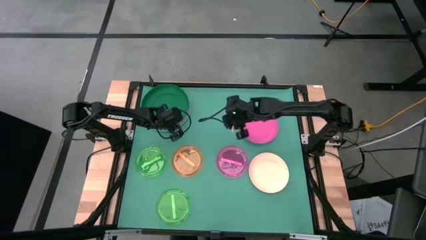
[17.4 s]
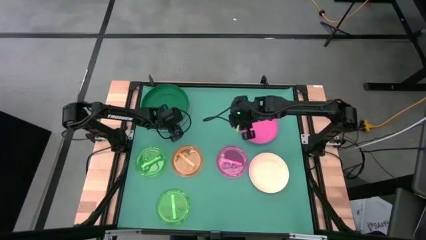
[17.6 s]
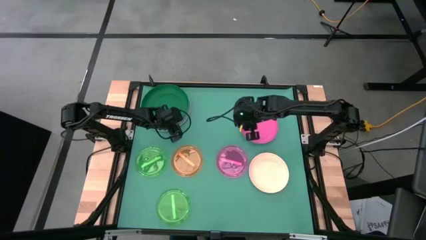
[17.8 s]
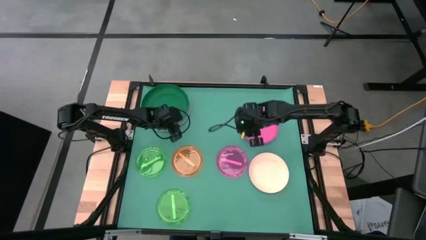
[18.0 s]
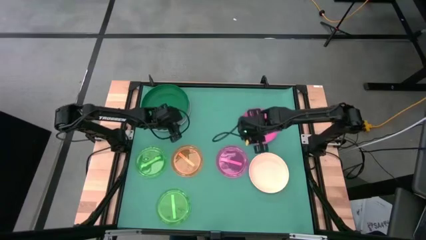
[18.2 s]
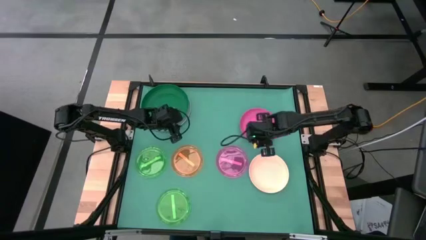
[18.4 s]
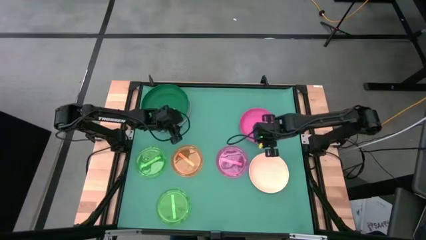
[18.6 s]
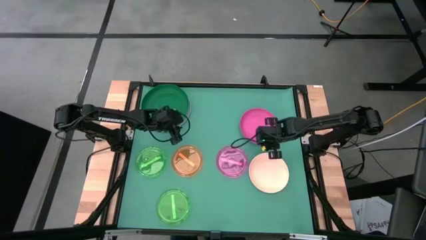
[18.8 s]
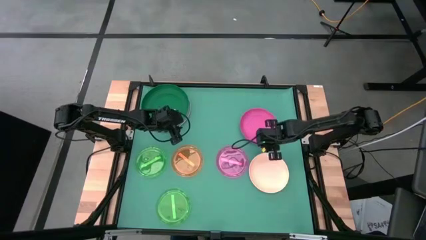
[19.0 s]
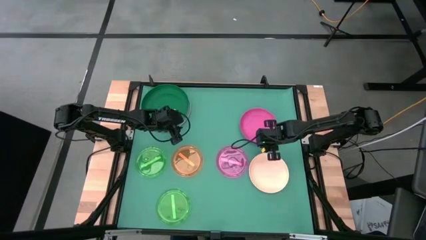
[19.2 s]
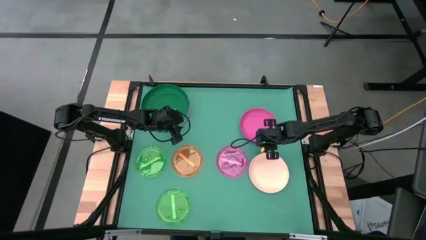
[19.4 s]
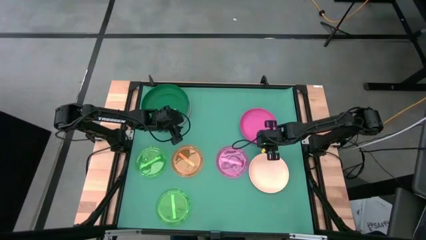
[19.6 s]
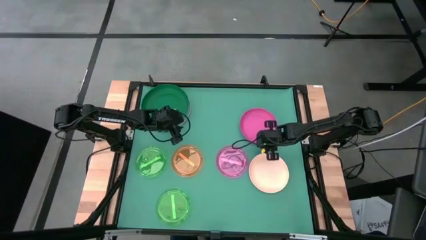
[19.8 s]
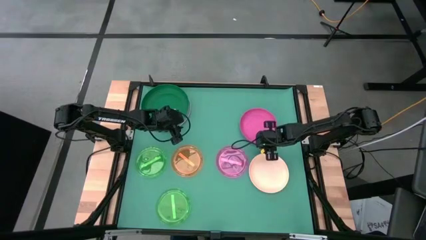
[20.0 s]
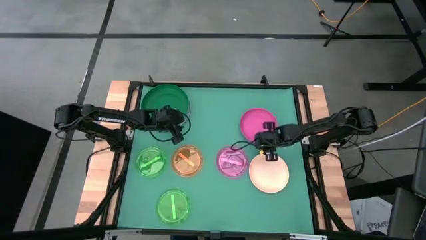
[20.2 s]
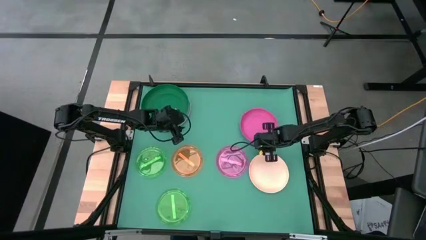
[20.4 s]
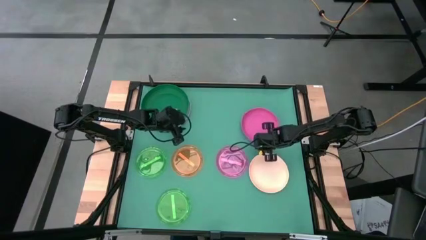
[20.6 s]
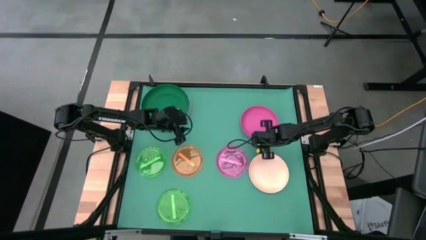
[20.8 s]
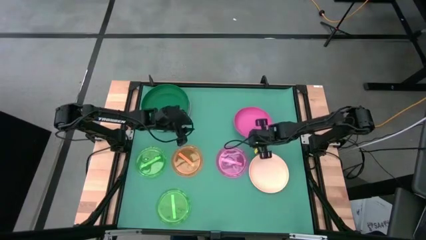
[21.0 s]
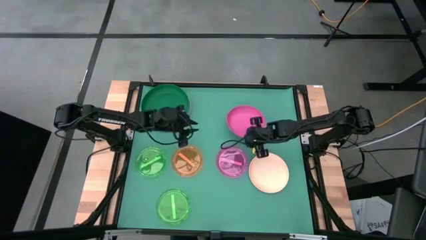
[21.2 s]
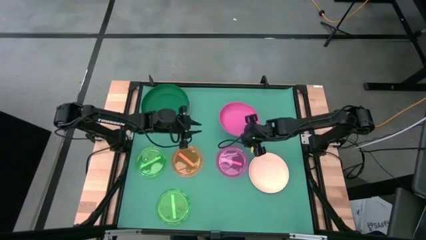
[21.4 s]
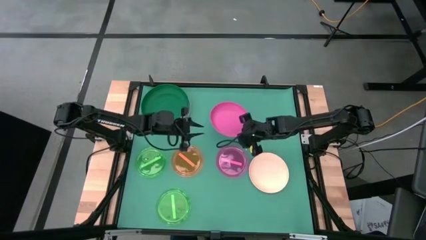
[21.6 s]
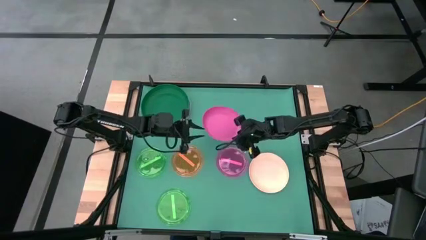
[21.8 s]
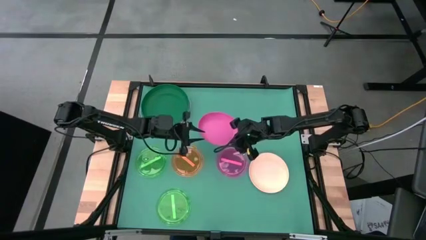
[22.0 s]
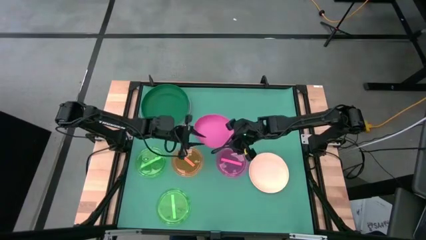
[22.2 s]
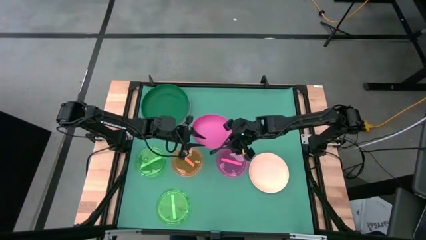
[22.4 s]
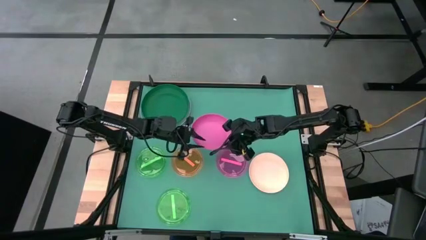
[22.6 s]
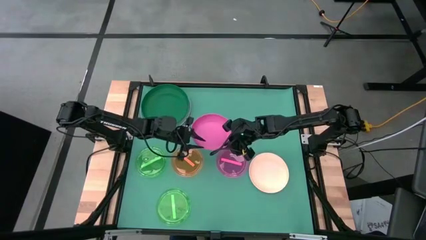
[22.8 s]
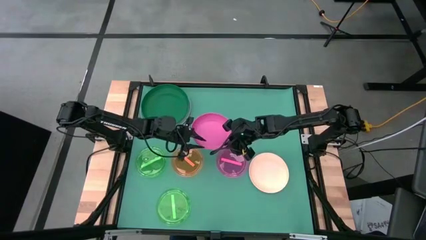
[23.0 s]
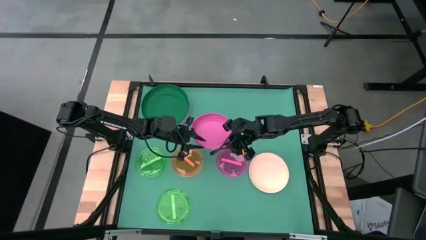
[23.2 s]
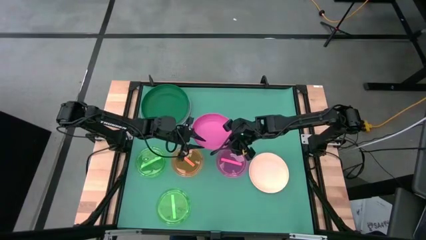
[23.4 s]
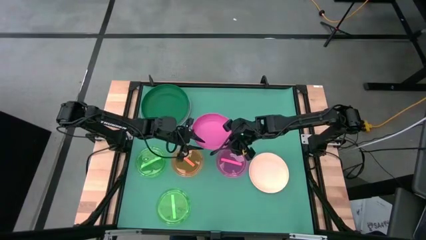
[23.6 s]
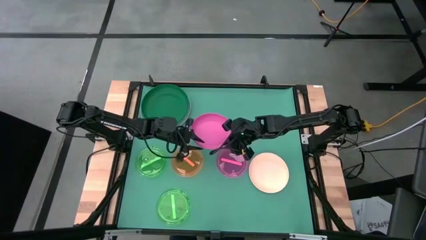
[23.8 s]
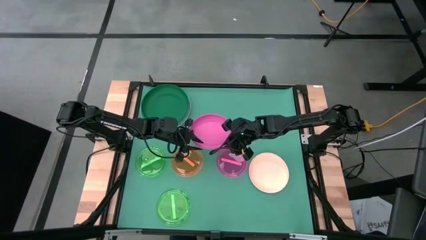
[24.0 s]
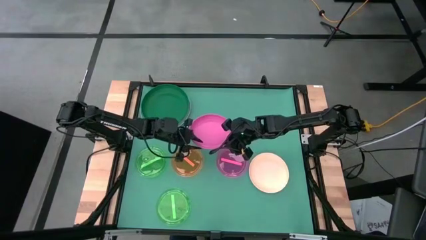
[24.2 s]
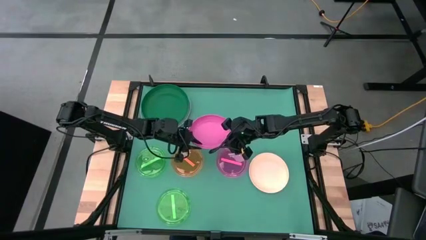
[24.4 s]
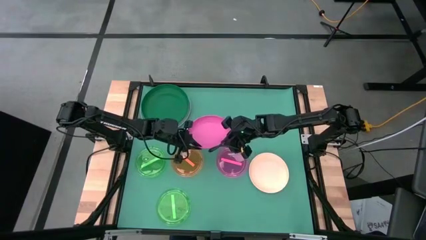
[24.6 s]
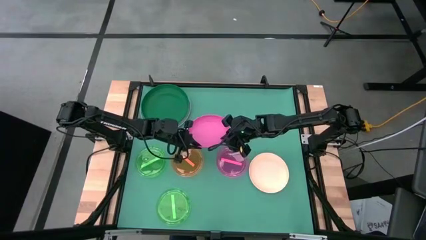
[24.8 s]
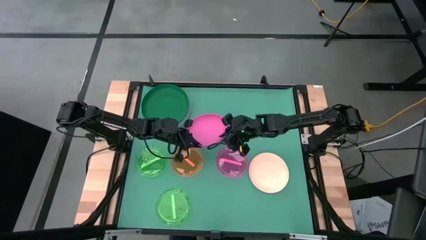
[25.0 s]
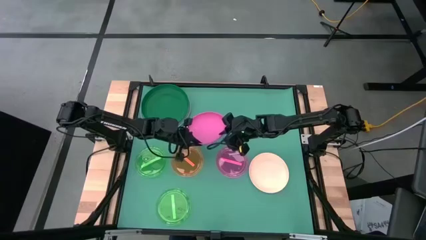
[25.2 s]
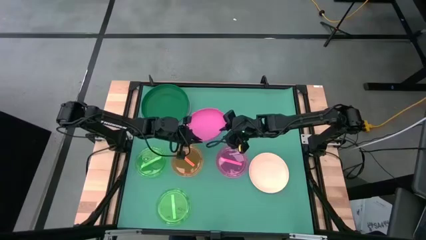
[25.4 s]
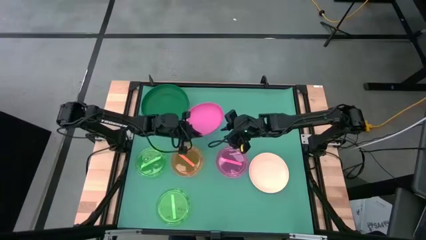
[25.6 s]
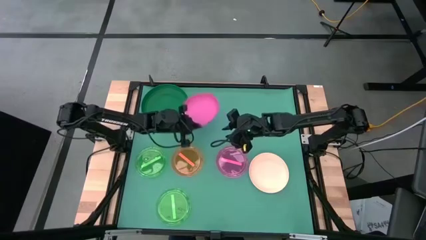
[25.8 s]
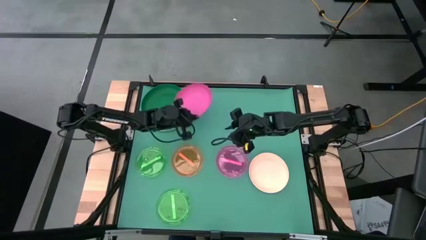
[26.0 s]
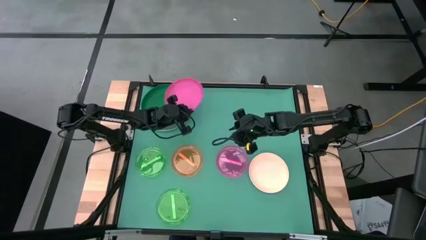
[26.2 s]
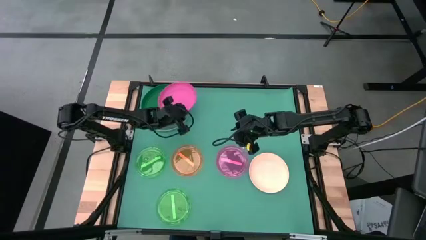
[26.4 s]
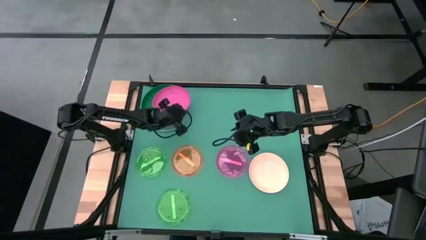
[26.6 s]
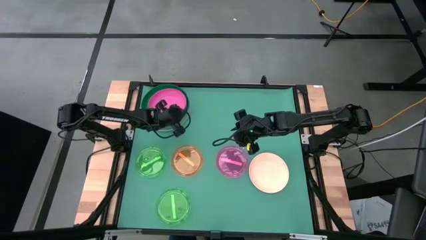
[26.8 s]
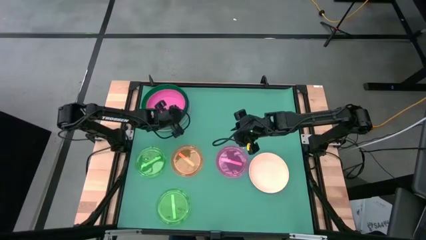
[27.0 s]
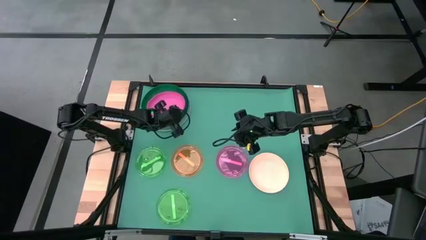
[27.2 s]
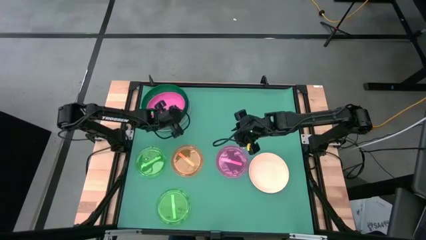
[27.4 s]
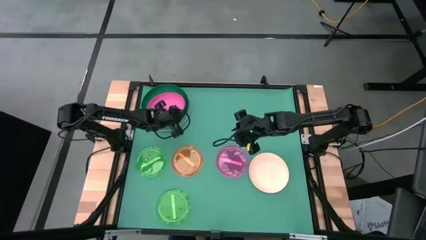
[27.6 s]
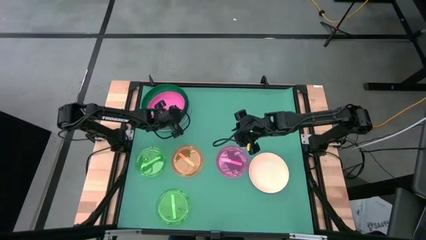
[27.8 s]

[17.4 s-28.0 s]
Task: Stack plastic plates
Stack the dark pink plate on top of the dark green plate
